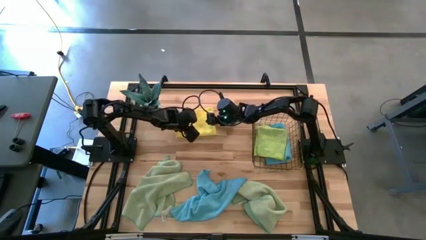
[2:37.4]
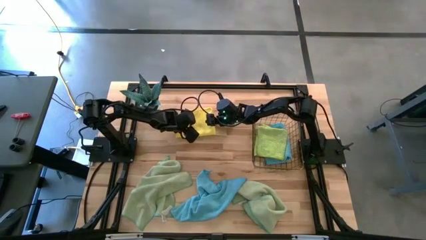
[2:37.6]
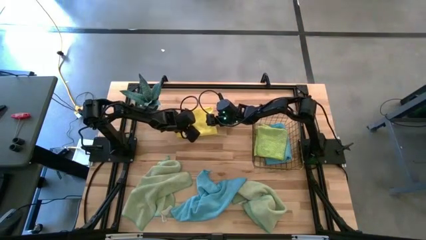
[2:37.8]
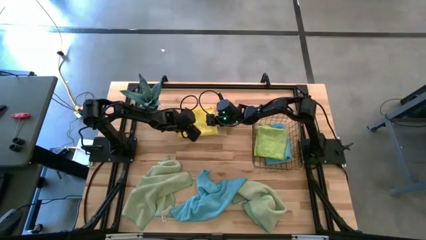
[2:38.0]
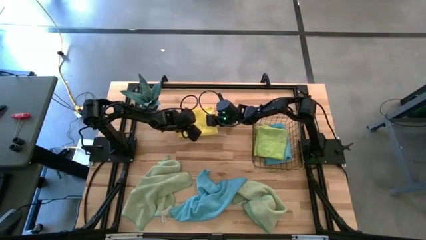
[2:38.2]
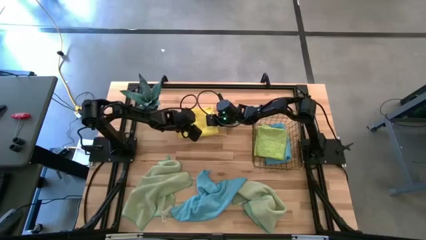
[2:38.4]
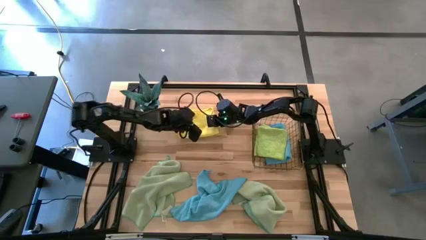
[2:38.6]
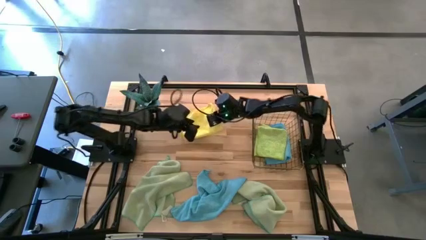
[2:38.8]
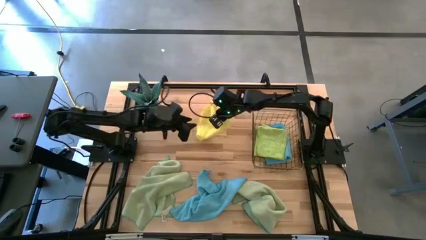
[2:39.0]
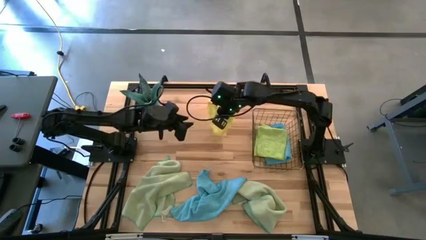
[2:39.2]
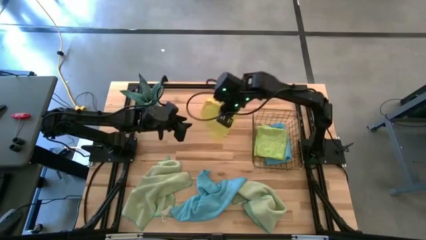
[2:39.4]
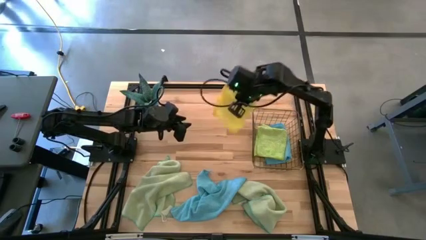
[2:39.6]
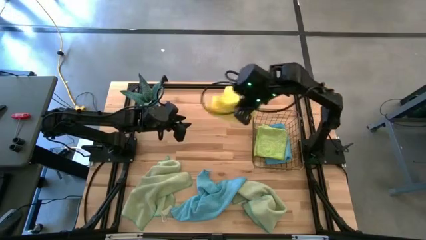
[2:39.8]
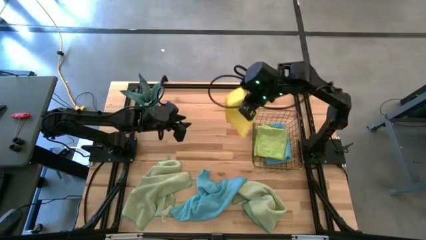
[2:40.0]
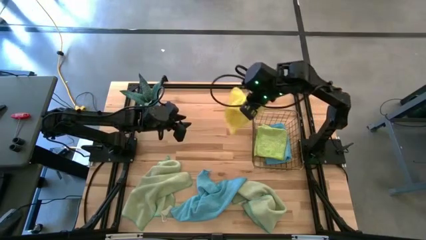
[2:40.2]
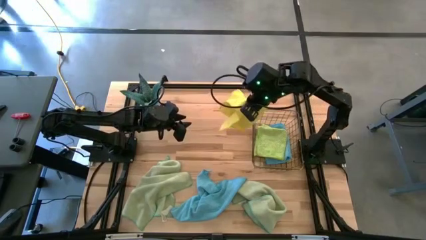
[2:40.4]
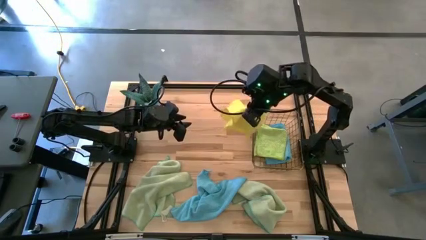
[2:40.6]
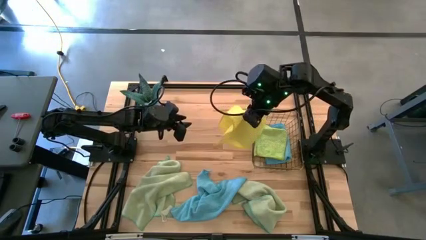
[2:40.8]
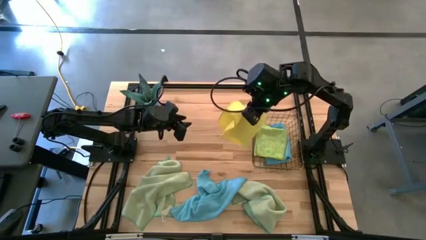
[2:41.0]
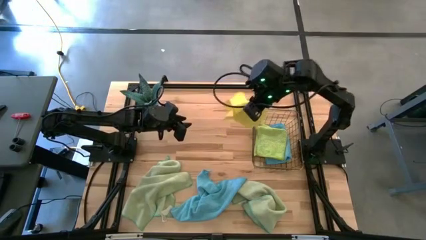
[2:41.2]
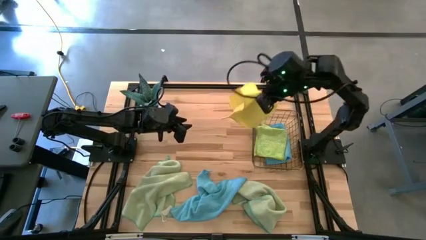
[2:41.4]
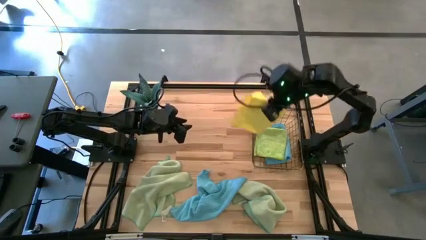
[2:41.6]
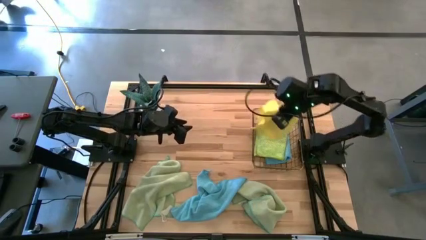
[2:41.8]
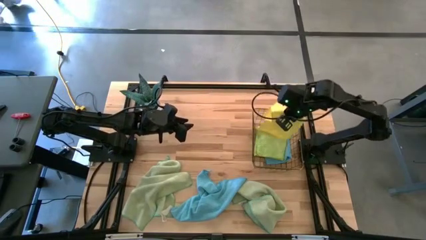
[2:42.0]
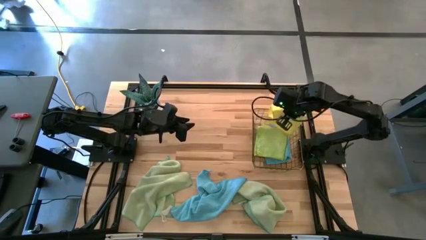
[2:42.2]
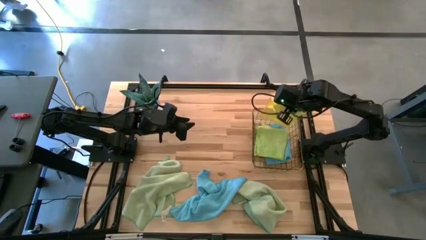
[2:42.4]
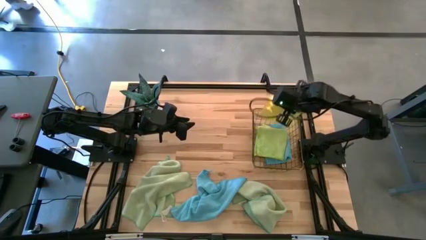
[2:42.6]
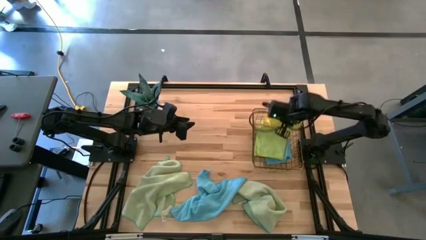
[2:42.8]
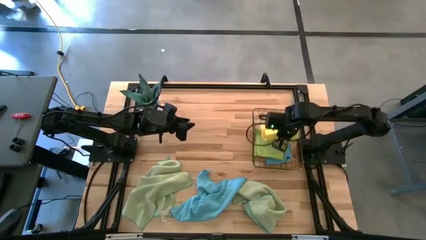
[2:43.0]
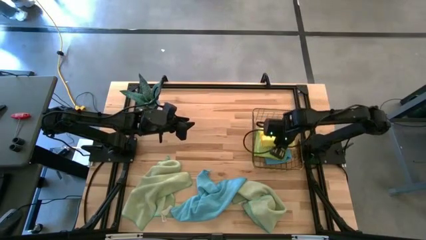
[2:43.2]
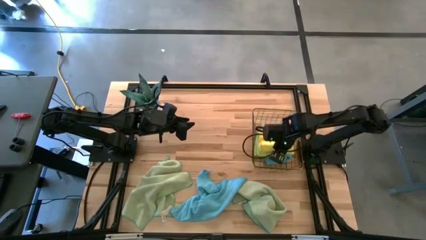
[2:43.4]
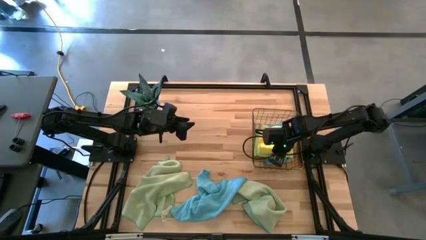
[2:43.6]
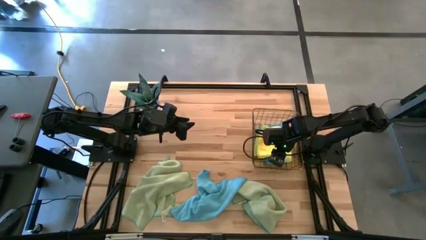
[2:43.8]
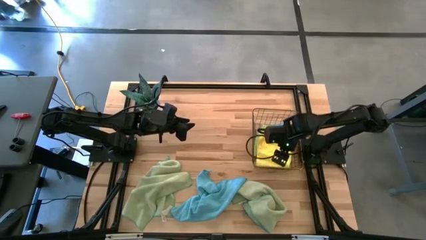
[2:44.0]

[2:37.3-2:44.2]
Task: Fold microfiber towels
Stack the folded yellow microfiber cloth into the wire basket

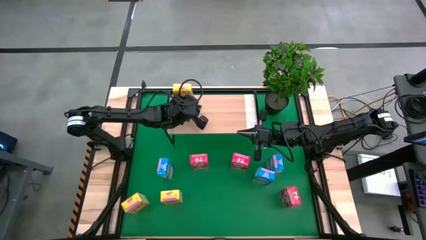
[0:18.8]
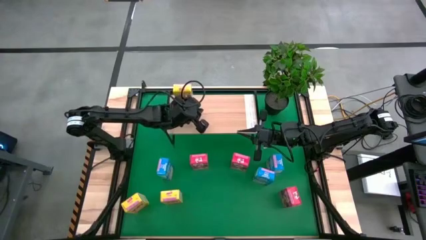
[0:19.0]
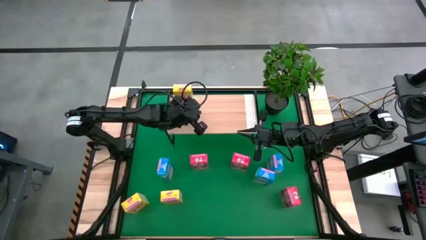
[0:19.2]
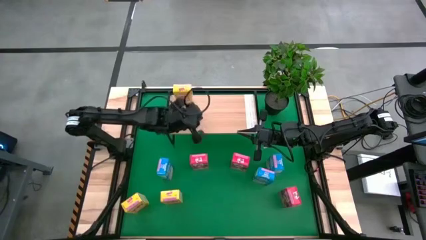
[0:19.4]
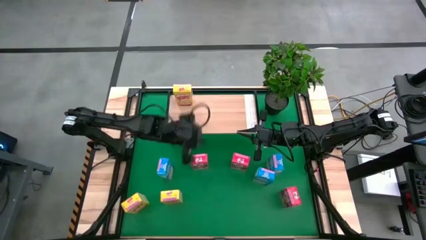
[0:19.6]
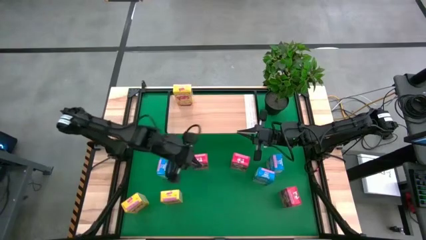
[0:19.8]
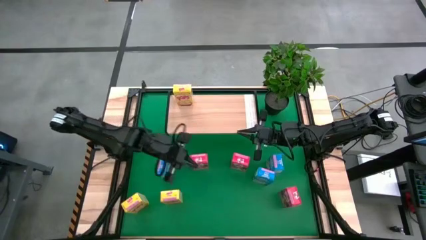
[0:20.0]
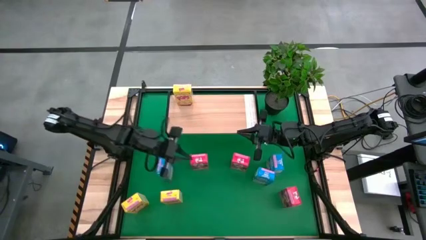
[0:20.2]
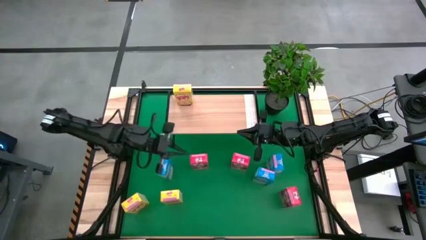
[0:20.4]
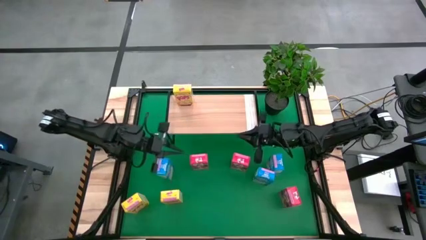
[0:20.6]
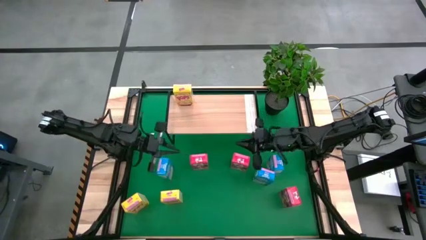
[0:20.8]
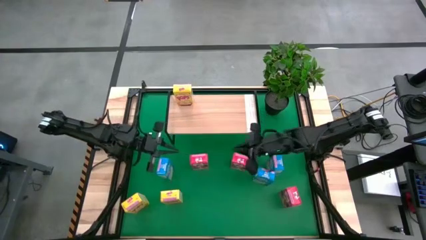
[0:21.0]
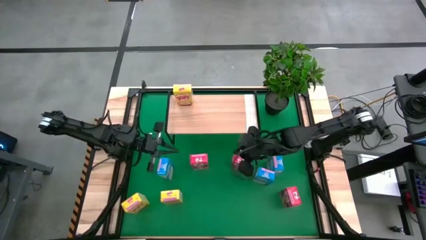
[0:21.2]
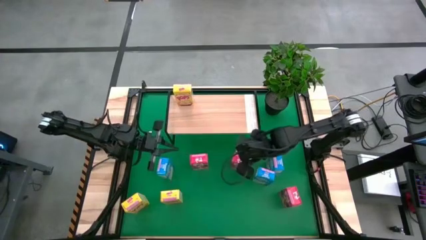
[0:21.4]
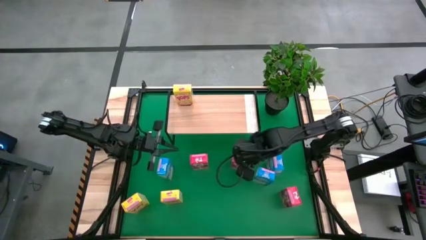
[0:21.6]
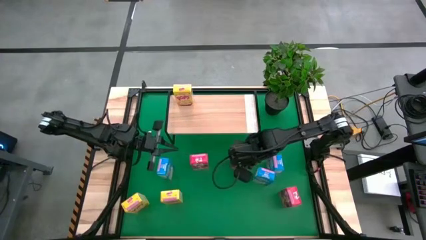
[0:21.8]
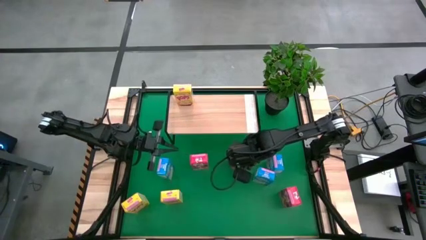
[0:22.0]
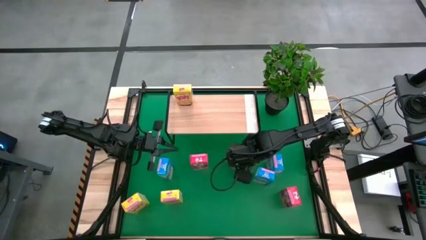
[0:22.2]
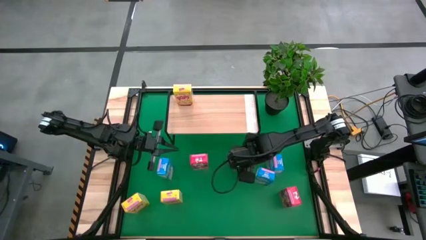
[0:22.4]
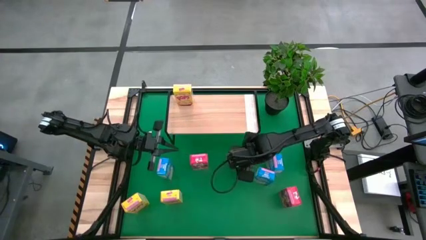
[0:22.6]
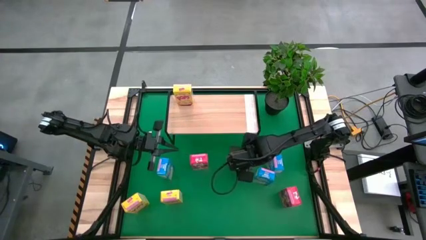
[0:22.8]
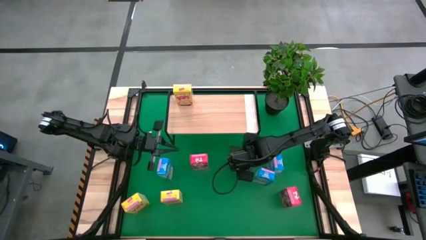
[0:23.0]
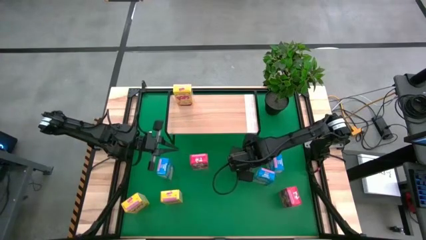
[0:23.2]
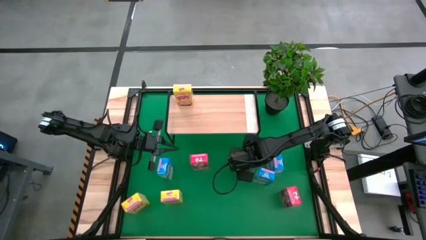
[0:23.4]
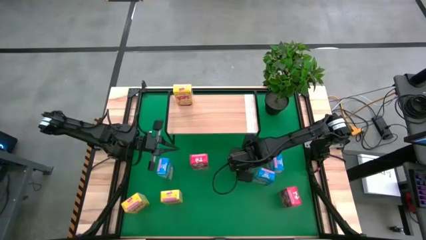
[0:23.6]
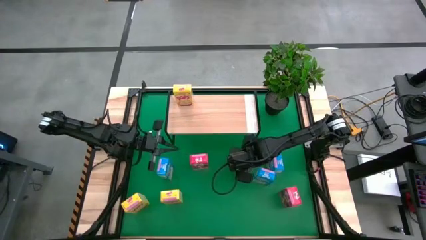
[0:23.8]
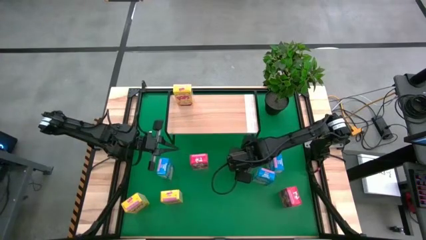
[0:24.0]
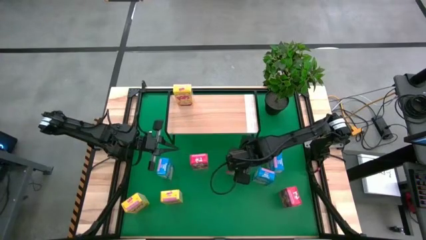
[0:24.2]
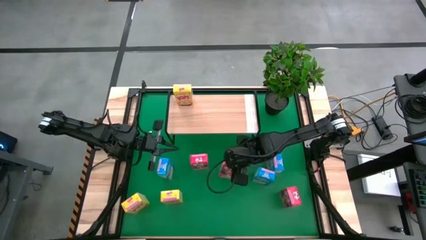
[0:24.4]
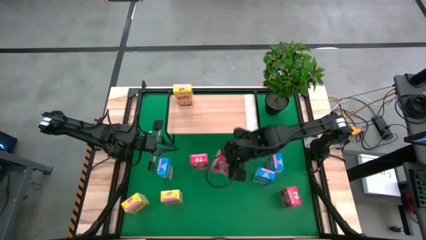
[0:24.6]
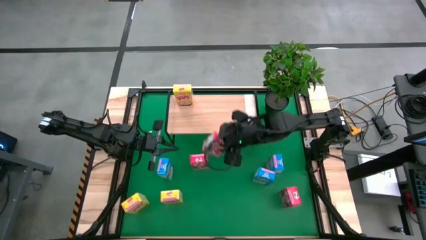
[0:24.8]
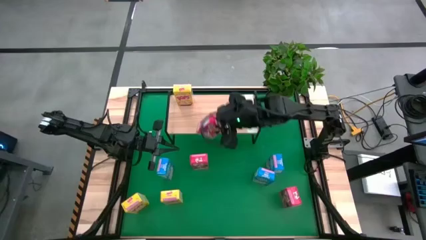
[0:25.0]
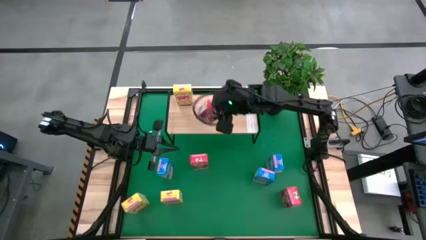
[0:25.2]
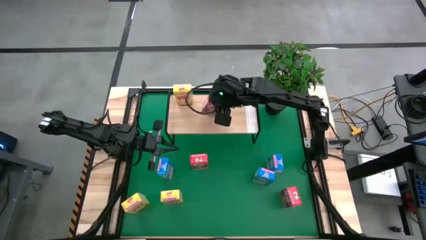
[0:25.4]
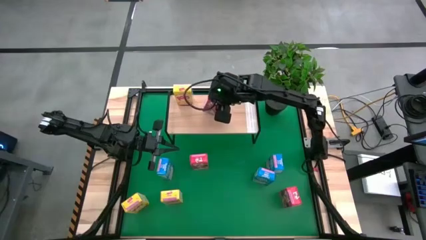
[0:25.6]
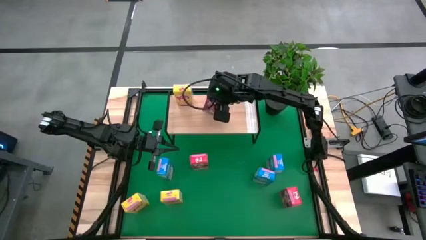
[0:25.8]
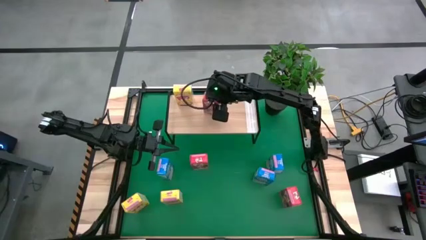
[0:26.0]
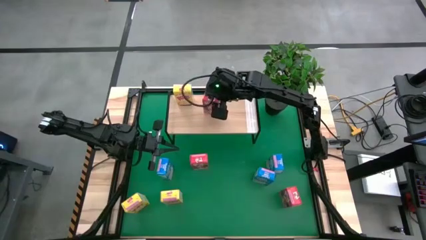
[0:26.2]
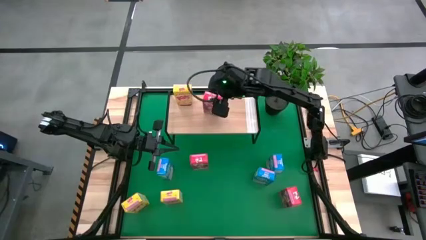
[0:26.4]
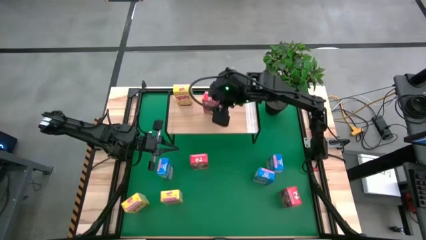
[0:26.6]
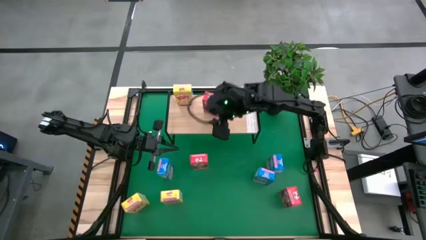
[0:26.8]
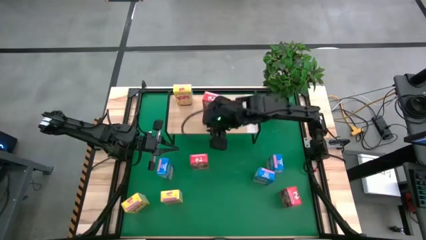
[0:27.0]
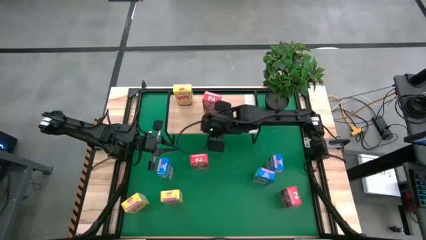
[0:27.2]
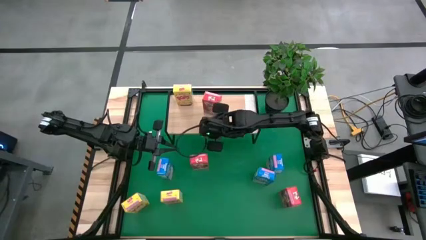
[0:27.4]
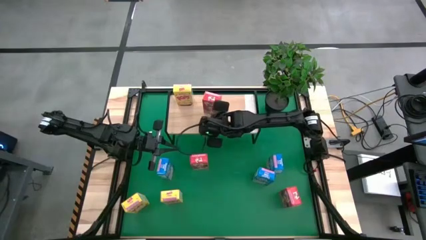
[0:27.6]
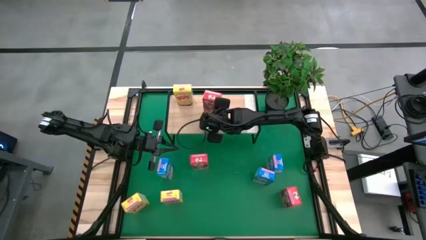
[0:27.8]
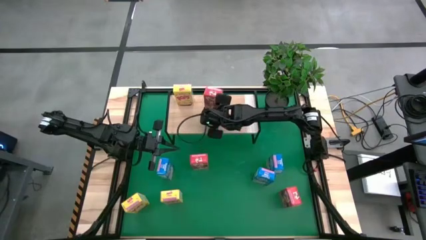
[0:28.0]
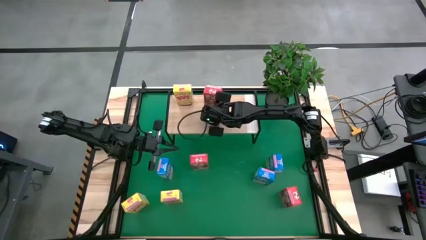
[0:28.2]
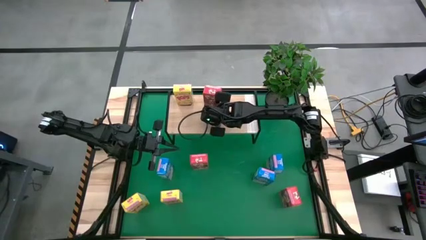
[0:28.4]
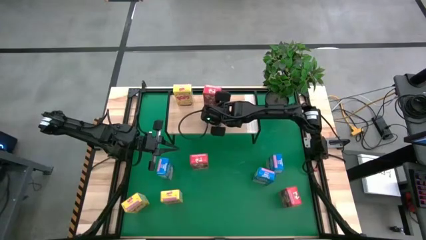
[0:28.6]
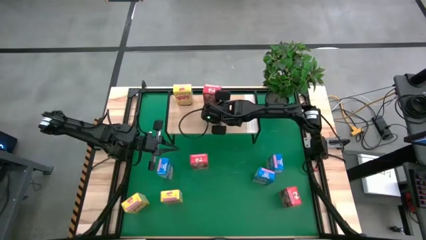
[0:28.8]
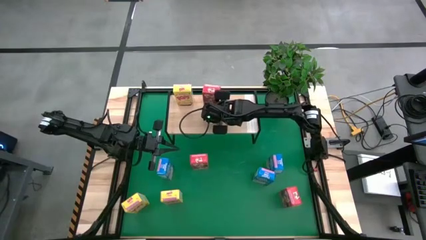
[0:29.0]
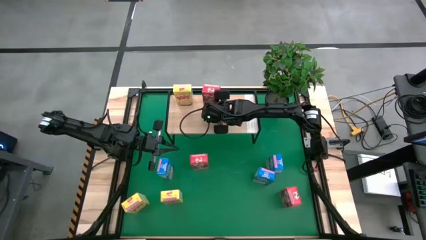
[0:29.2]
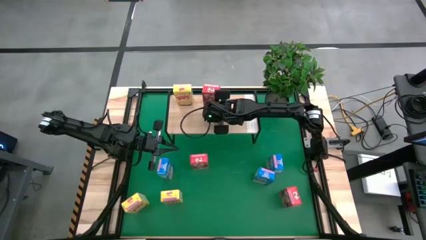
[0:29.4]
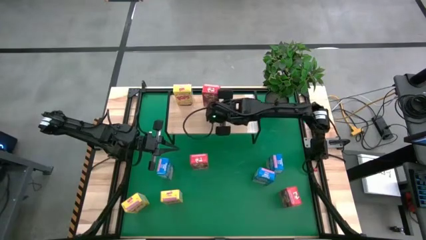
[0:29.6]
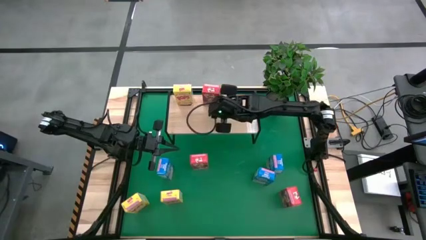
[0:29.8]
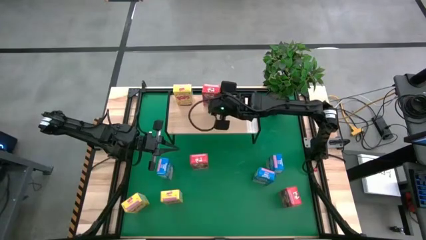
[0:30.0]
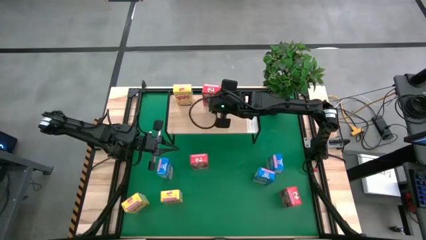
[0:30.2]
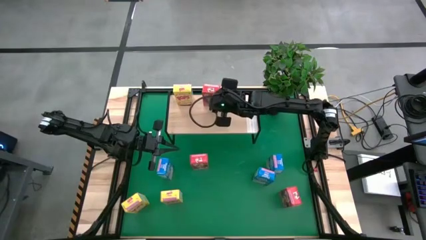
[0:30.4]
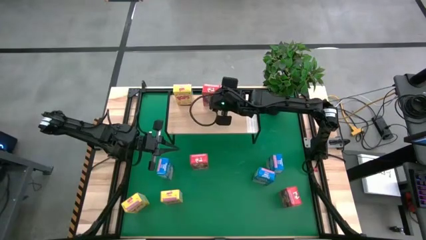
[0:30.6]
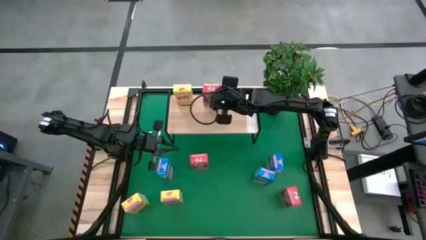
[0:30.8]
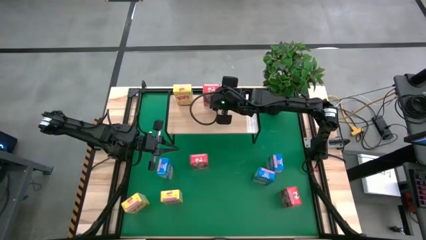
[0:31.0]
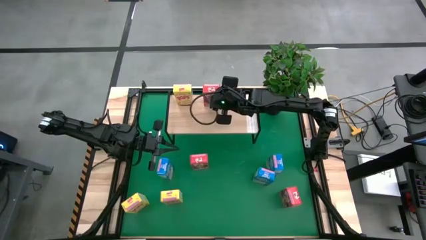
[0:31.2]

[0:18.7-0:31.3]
Task: Stack cereal on shelf
Put the middle top red cereal box on the shelf
